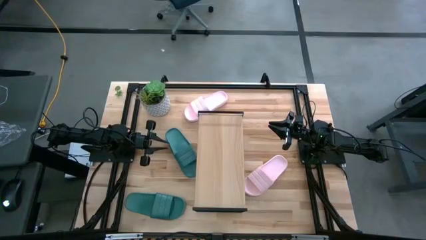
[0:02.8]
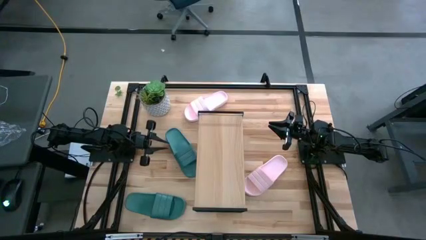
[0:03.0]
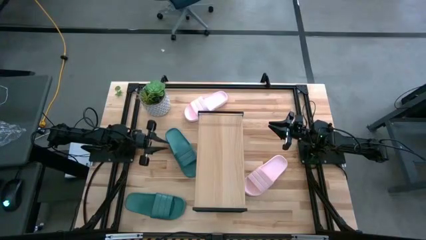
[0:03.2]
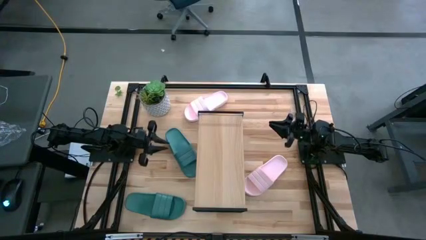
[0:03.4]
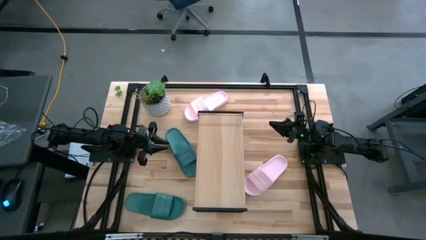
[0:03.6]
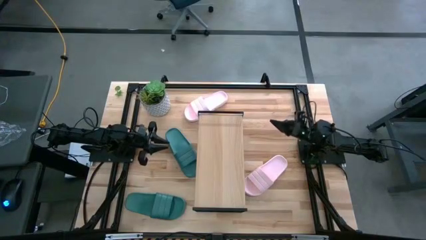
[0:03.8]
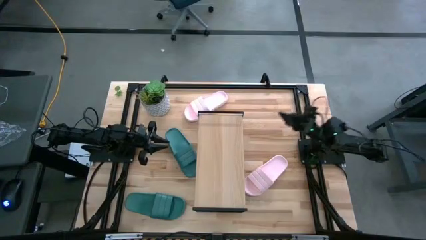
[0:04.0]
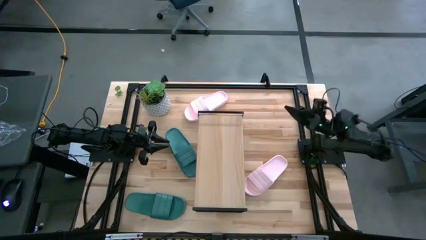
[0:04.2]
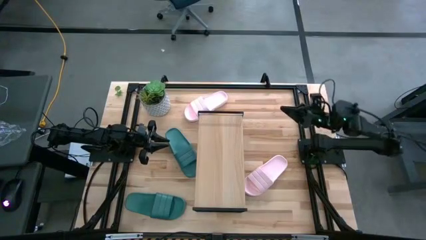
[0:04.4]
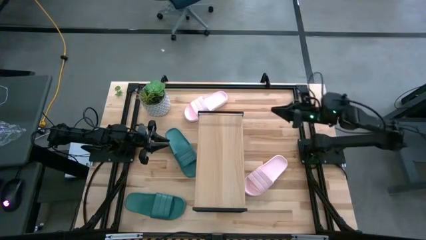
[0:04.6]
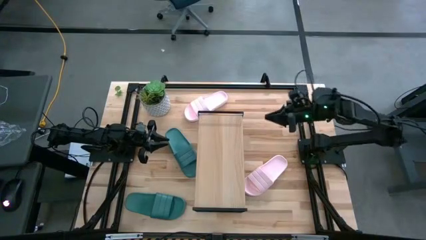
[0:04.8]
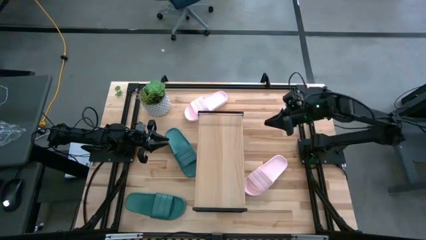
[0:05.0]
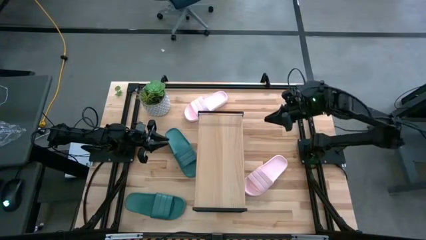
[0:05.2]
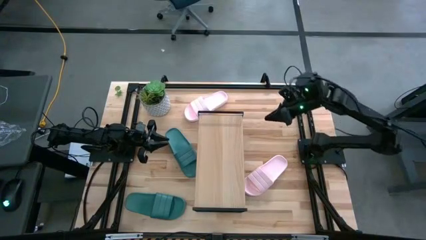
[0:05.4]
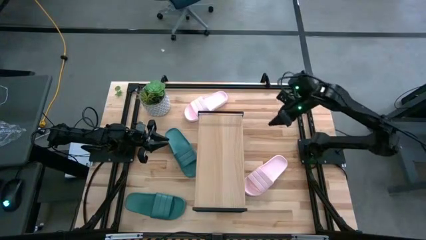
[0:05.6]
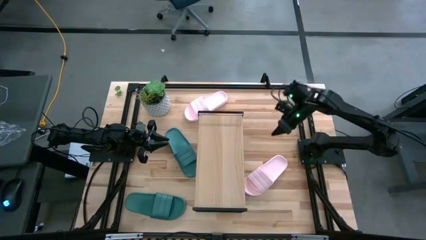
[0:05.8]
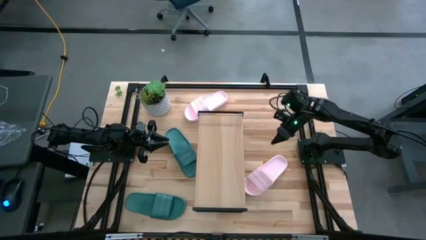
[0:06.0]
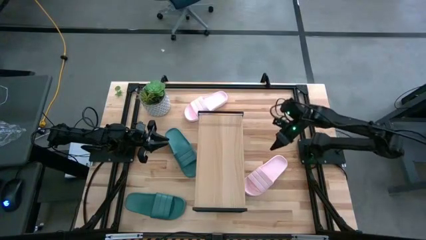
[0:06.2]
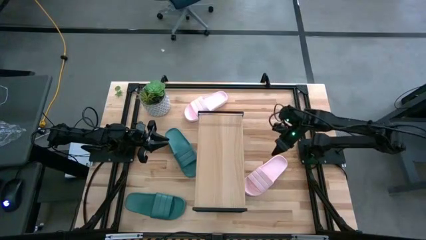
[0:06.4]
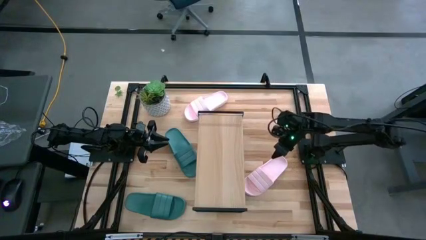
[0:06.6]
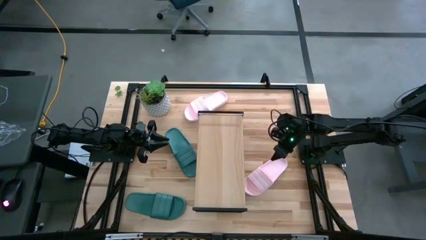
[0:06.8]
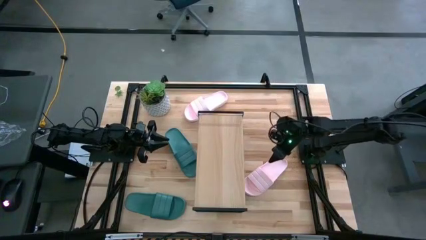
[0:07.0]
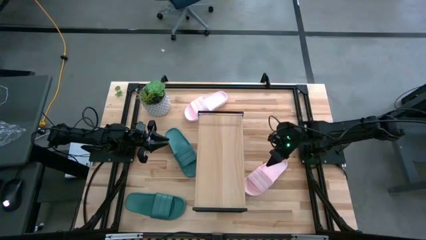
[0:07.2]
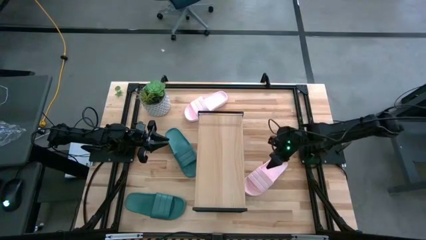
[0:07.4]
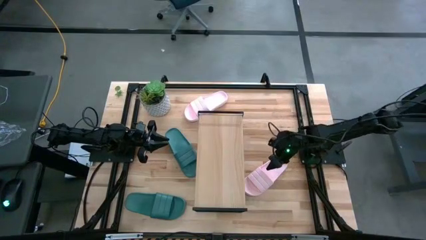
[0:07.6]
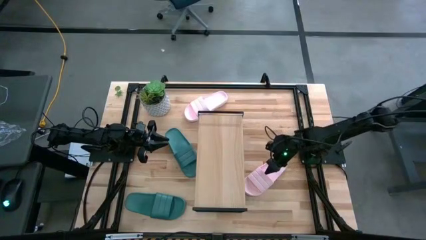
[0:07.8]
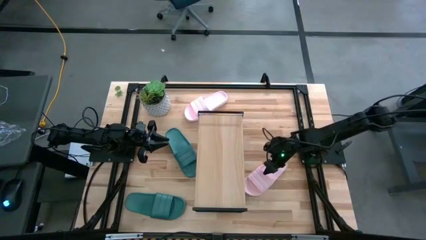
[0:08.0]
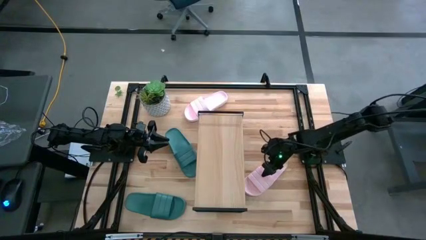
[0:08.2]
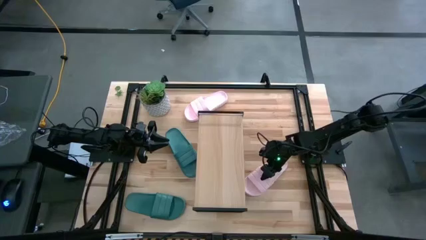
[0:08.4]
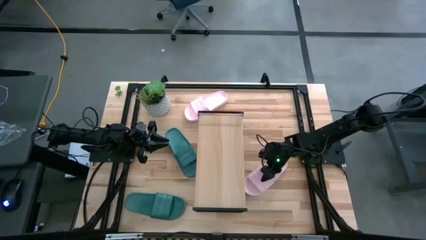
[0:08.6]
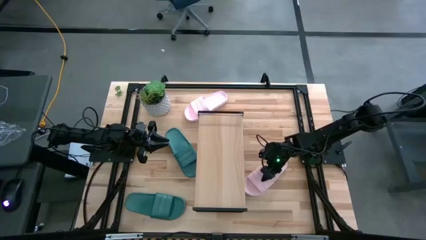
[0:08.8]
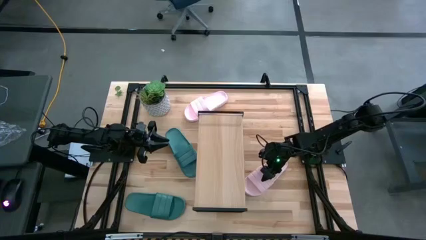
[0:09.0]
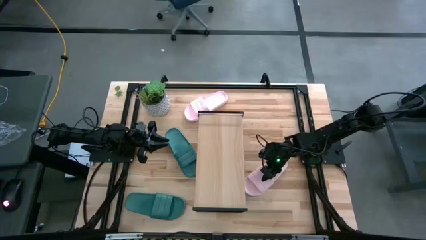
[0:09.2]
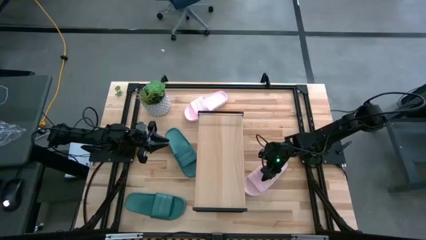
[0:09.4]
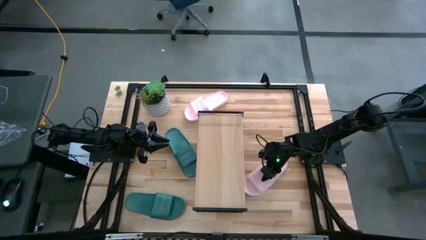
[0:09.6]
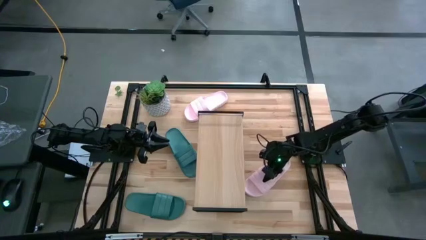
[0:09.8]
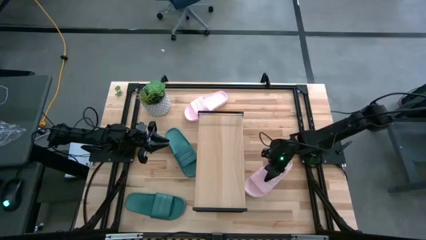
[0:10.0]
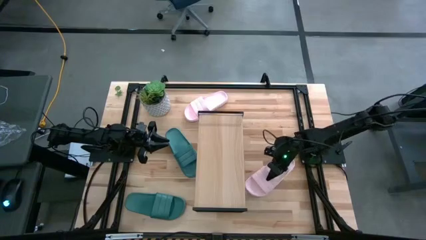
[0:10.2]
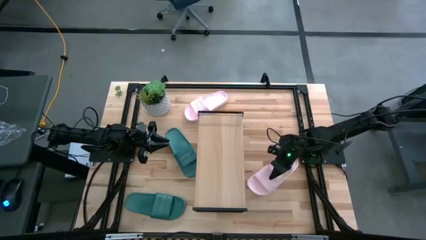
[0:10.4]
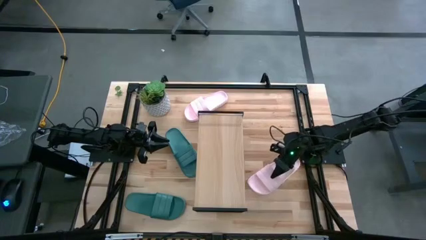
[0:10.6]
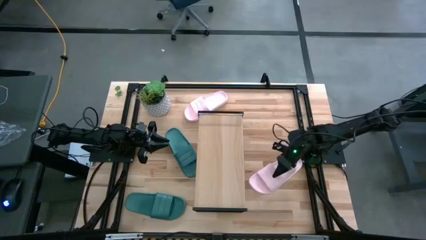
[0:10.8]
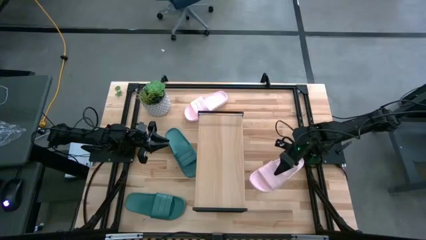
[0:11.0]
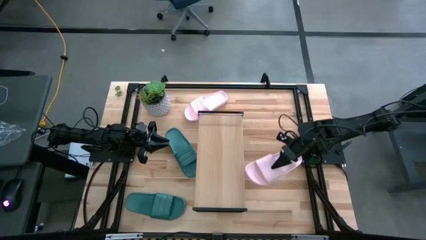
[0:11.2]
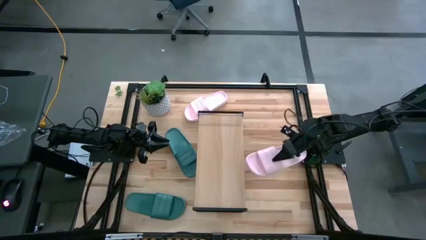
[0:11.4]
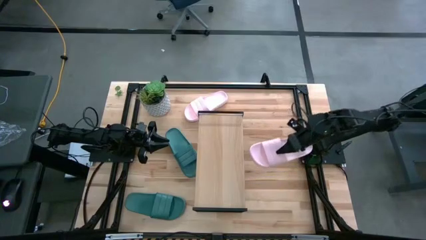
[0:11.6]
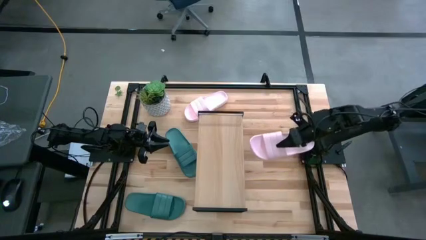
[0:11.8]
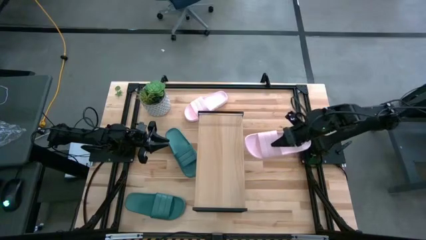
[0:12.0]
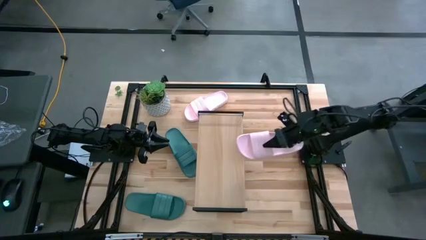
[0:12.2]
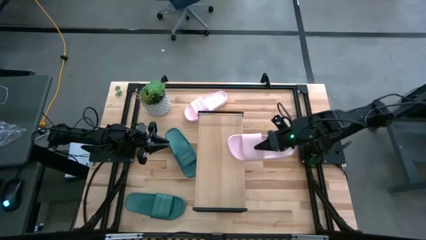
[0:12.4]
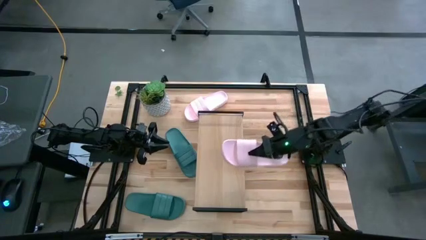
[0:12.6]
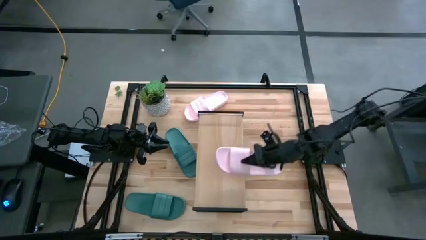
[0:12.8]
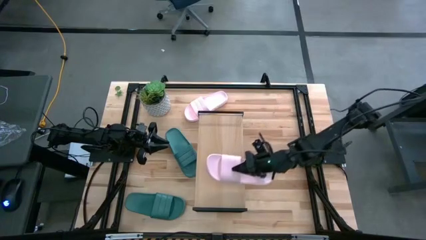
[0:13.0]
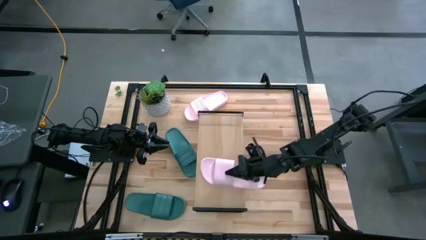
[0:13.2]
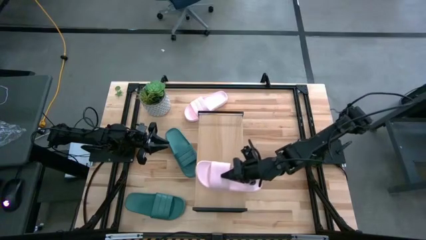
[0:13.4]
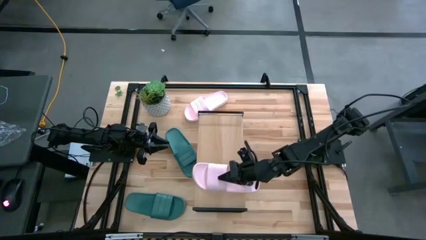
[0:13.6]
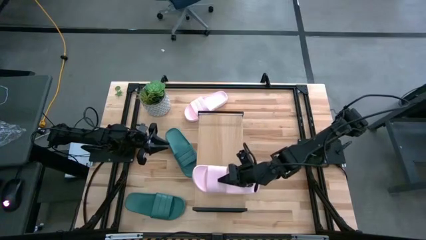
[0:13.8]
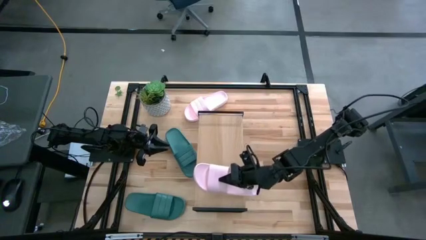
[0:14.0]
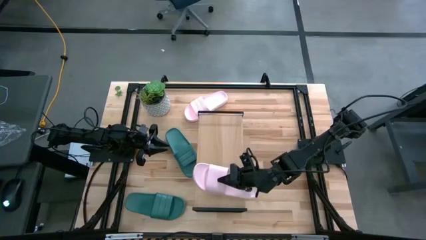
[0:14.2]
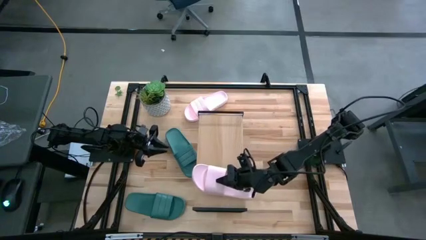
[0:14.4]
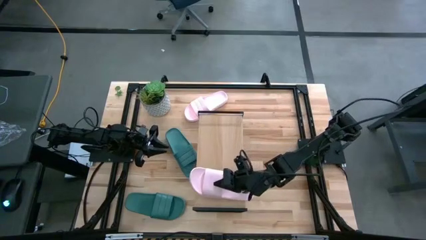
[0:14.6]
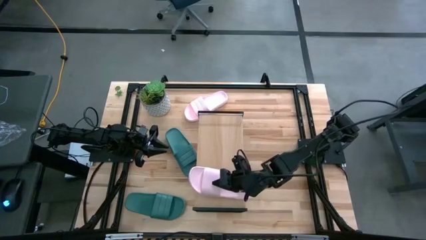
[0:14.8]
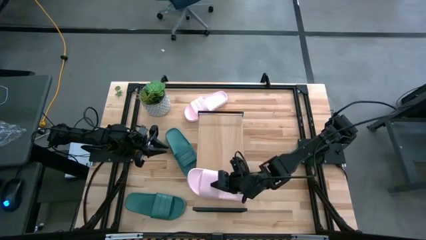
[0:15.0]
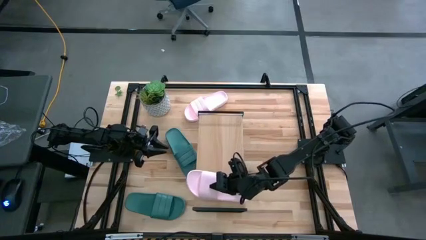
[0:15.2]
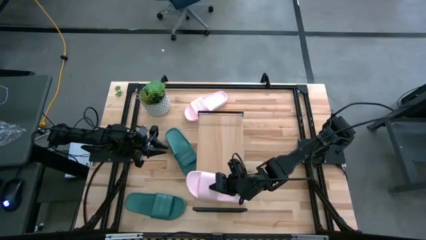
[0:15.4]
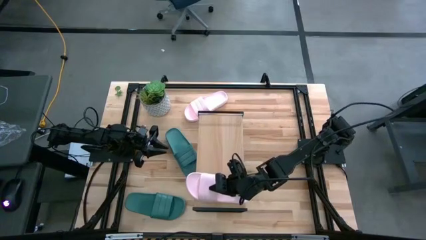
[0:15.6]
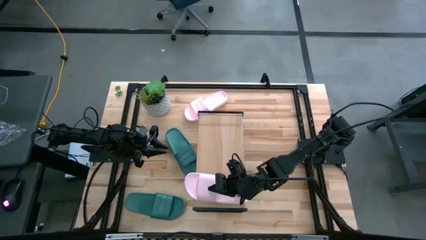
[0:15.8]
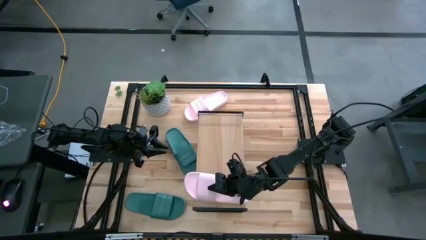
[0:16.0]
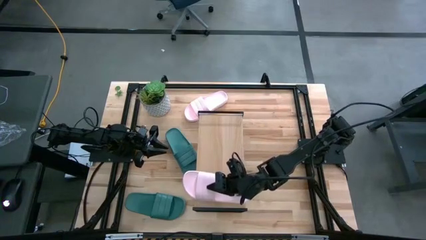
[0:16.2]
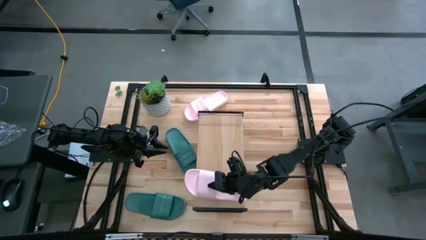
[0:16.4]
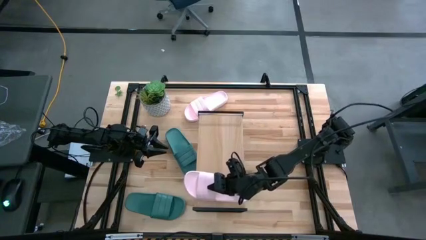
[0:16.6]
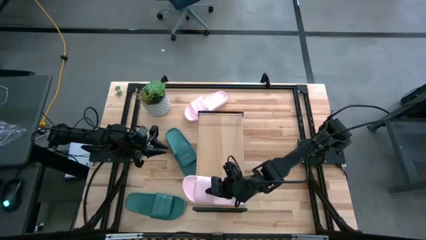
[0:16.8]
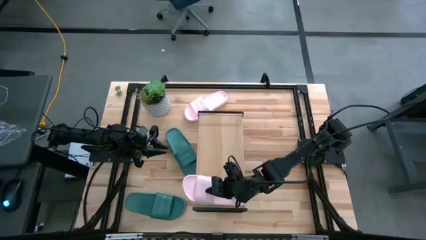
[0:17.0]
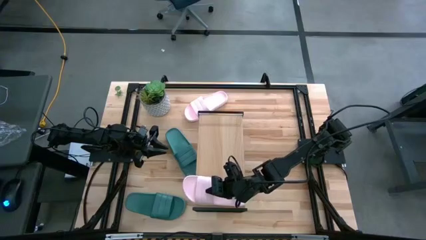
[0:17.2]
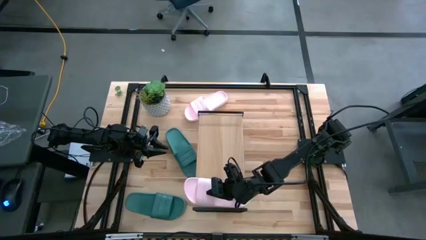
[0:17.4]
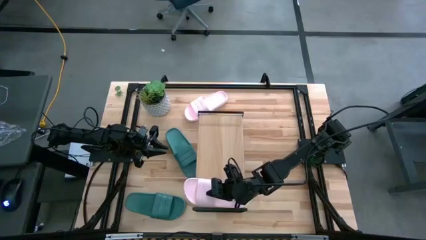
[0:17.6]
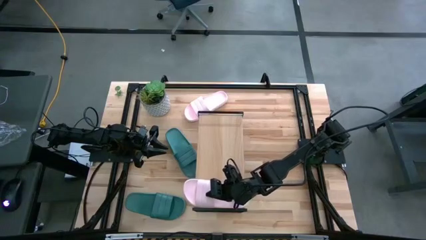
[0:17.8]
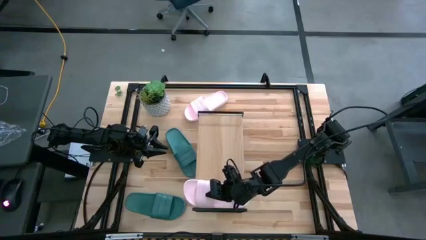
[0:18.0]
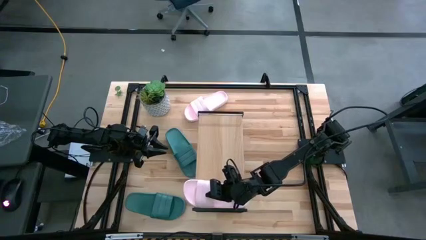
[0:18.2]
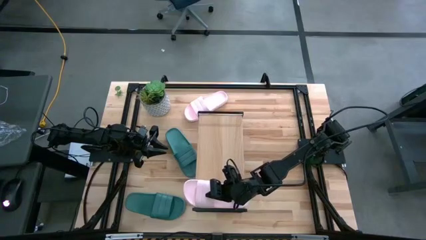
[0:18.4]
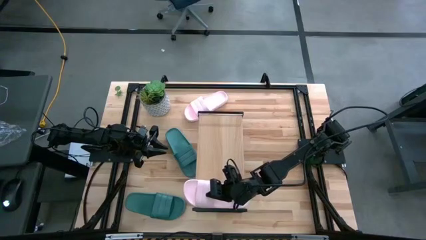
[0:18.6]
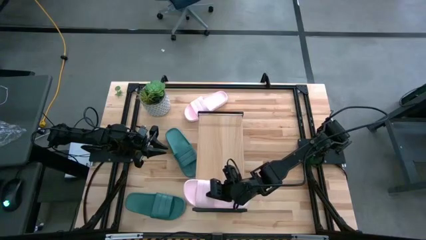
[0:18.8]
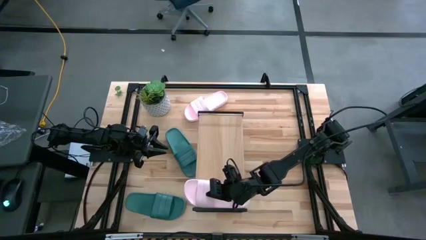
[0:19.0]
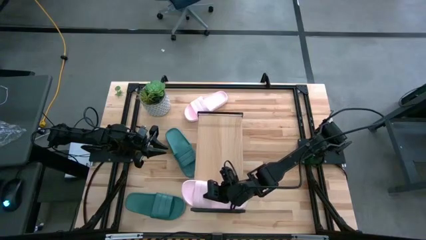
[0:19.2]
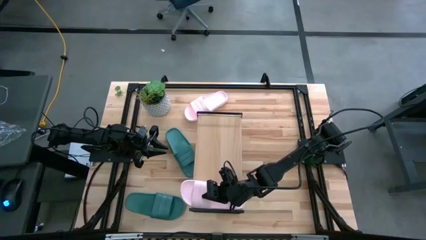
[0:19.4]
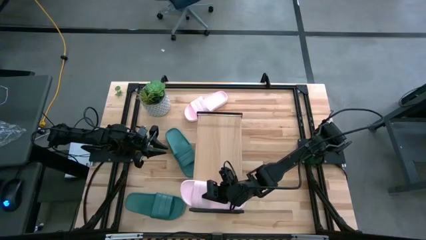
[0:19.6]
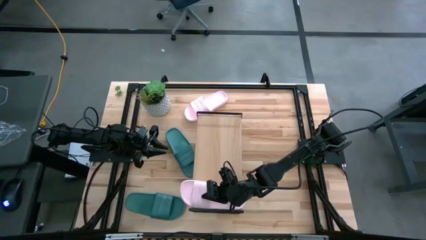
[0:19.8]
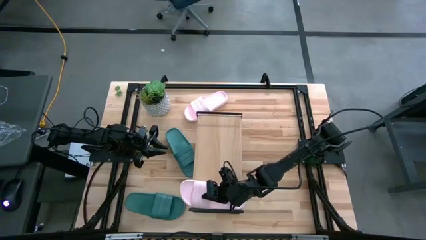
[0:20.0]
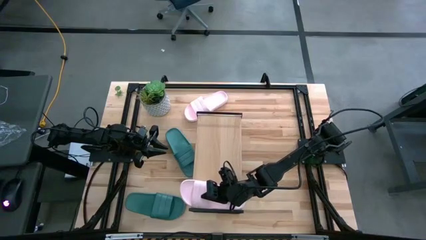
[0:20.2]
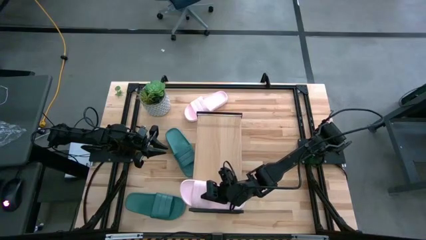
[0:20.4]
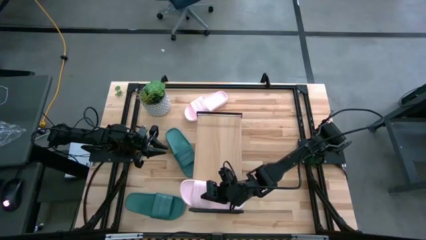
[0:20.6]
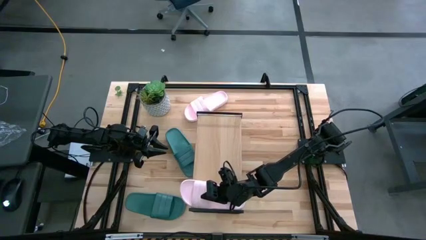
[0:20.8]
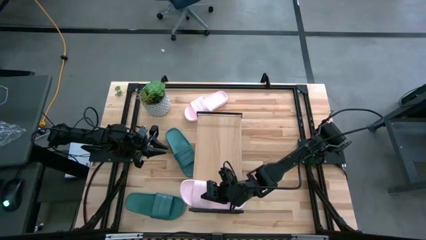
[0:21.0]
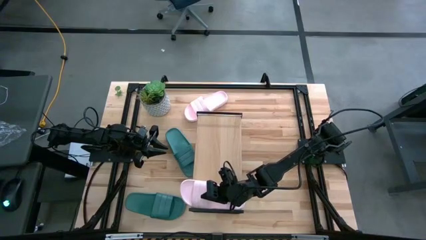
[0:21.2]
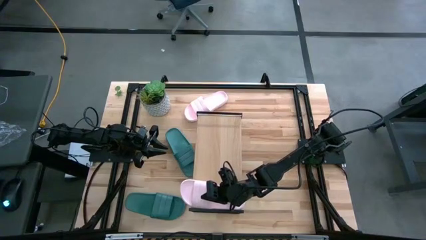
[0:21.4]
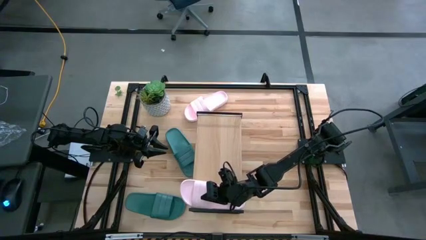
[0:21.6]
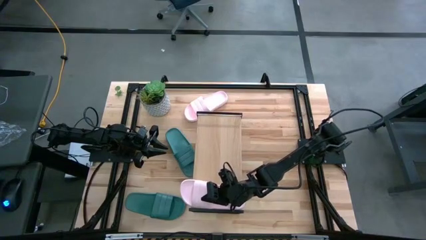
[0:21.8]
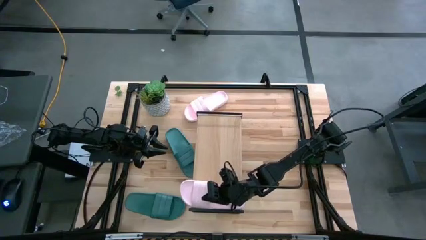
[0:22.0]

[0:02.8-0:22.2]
Task: Pick and place slides into the shelf
Put the bottom pink slides on the shelf
